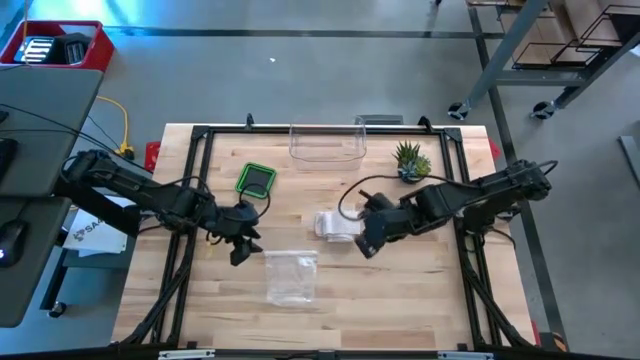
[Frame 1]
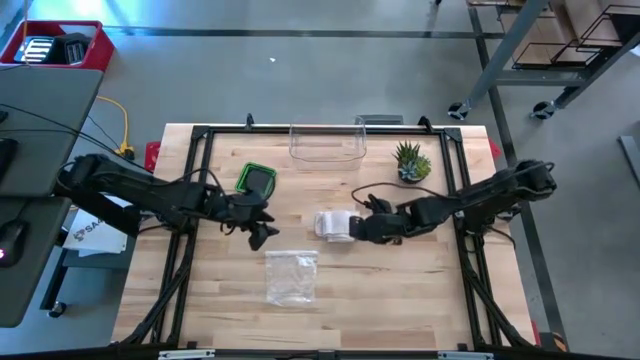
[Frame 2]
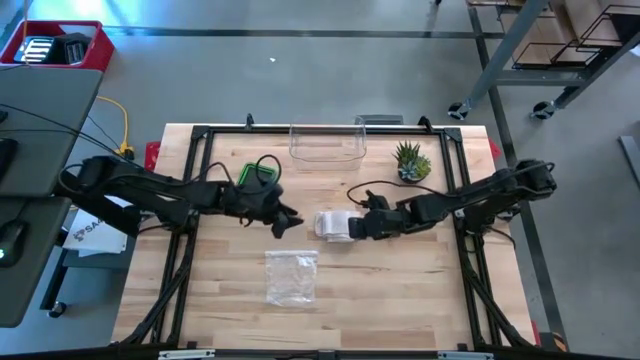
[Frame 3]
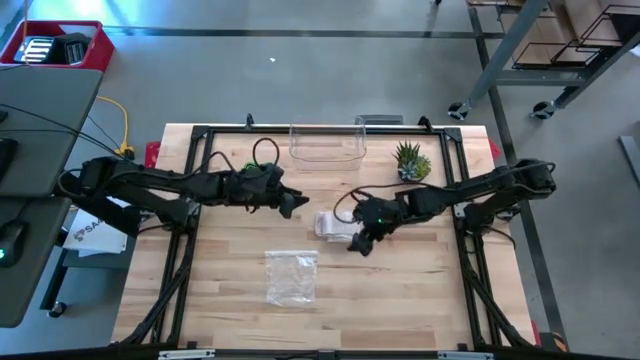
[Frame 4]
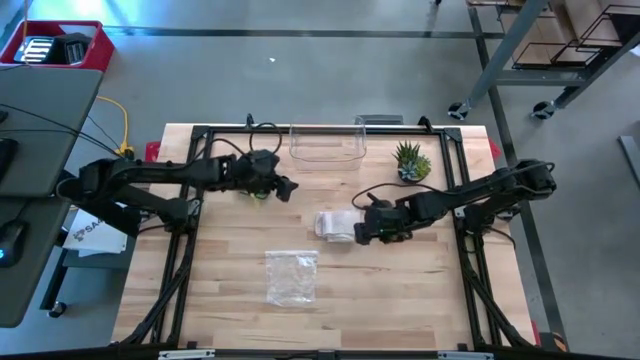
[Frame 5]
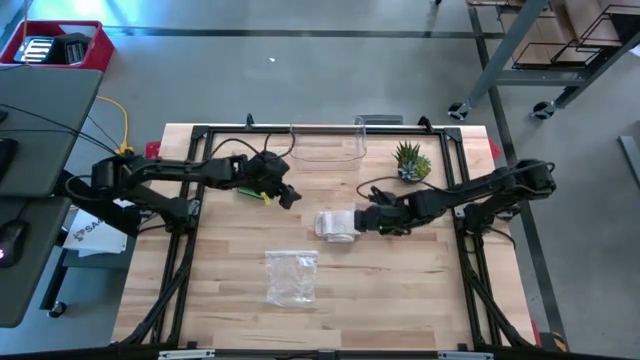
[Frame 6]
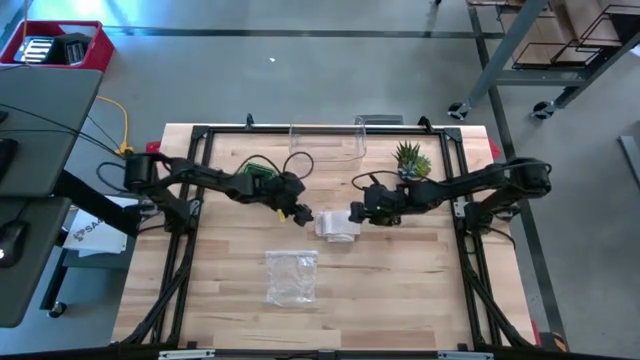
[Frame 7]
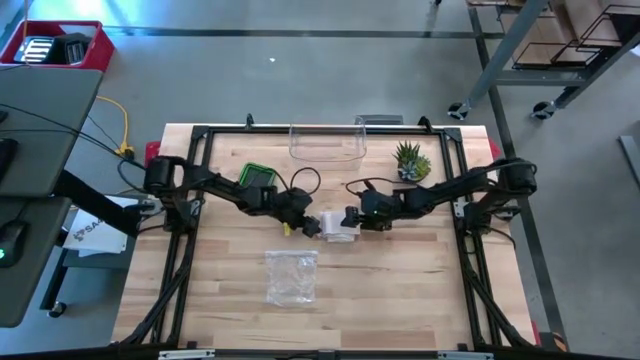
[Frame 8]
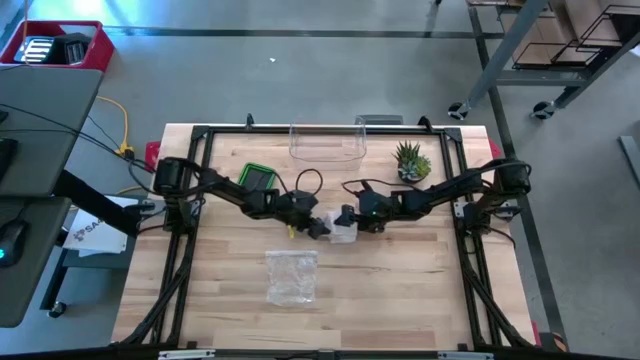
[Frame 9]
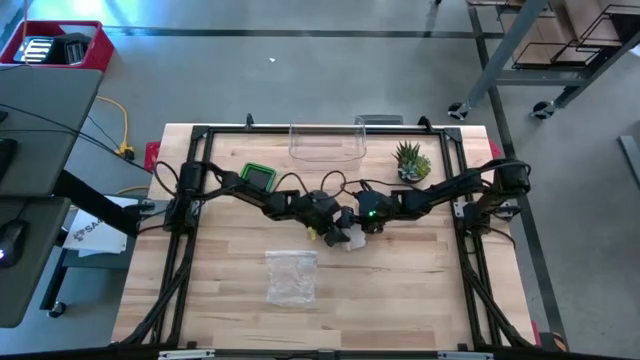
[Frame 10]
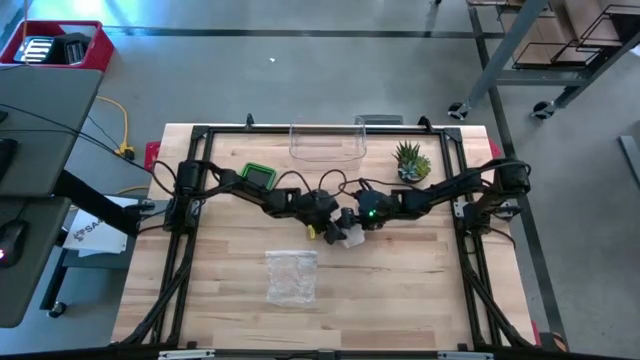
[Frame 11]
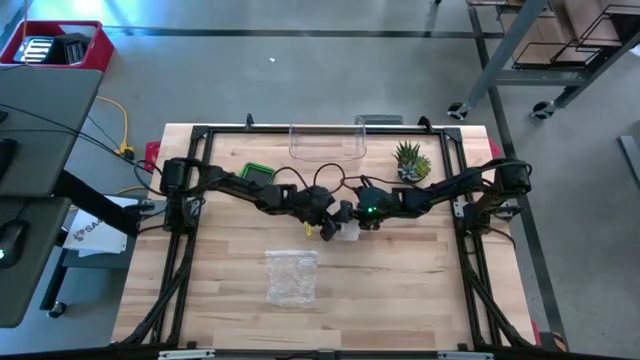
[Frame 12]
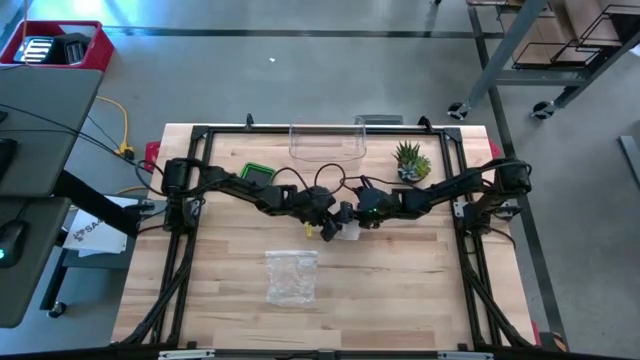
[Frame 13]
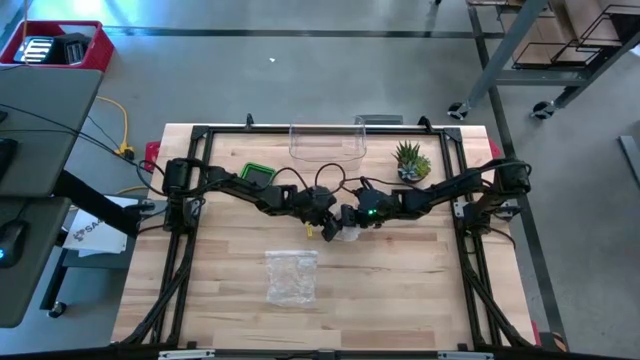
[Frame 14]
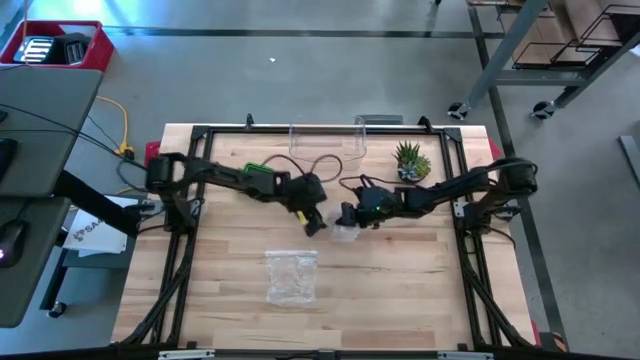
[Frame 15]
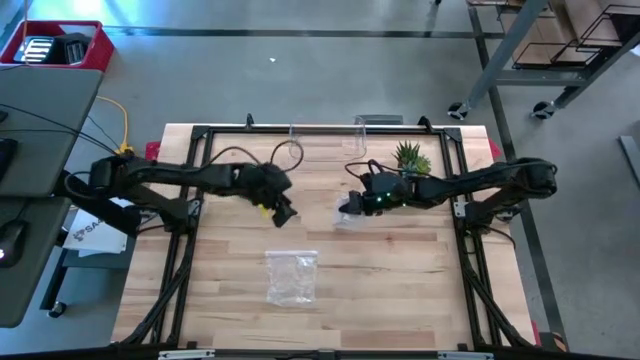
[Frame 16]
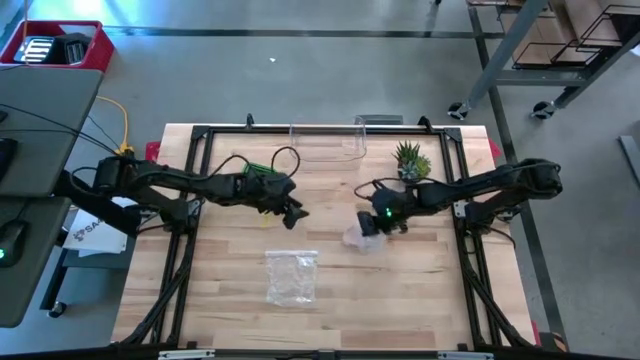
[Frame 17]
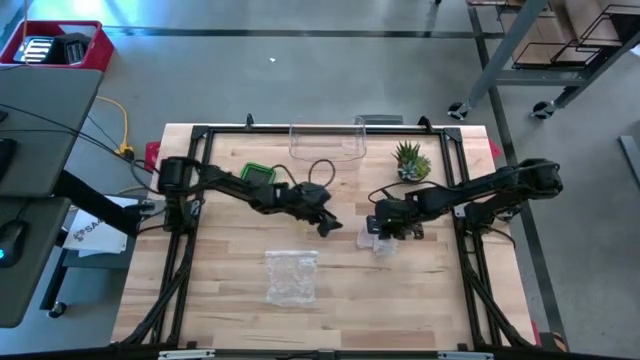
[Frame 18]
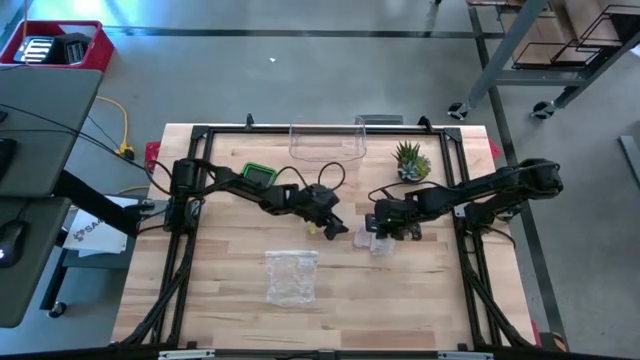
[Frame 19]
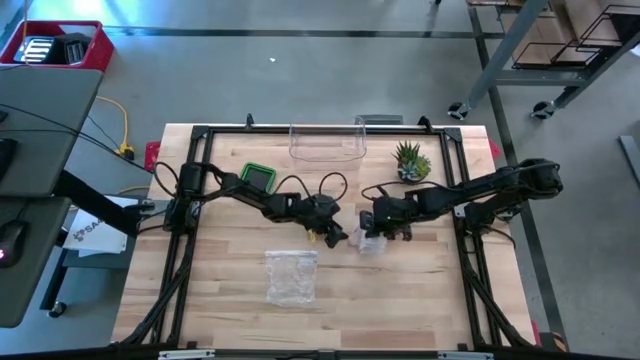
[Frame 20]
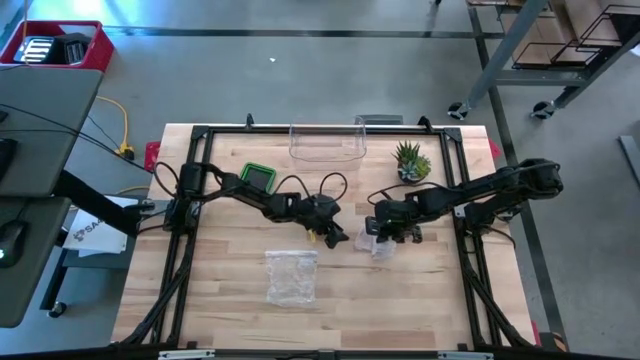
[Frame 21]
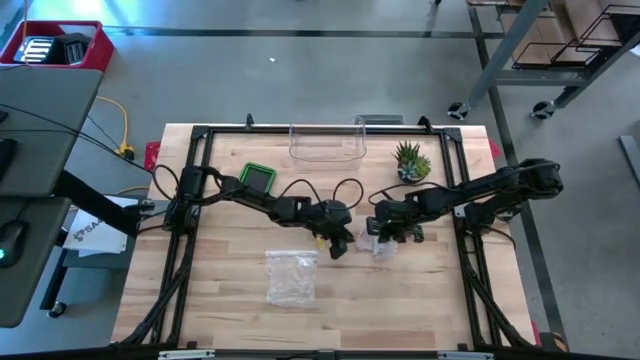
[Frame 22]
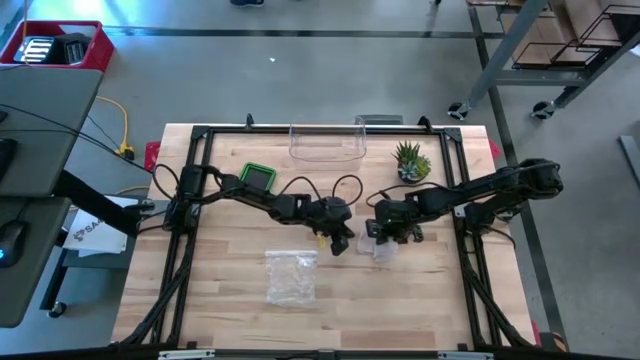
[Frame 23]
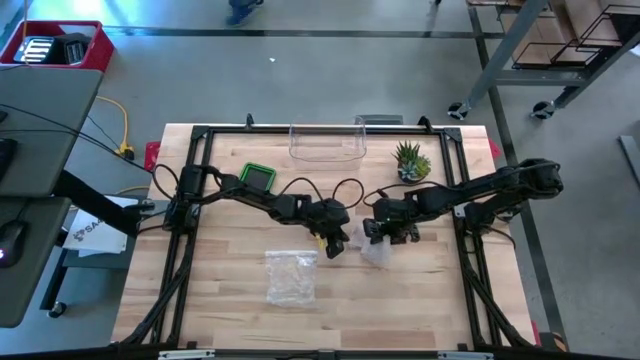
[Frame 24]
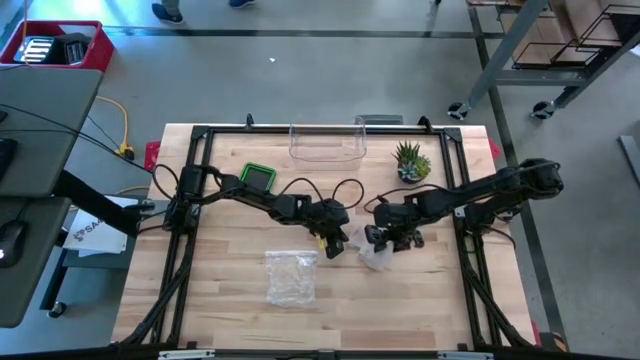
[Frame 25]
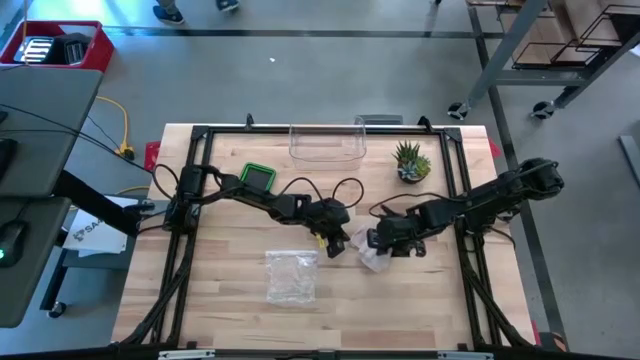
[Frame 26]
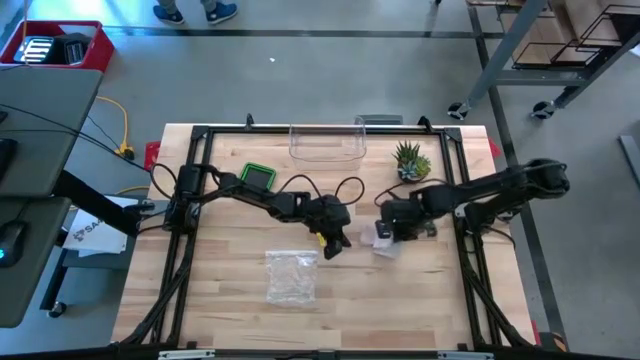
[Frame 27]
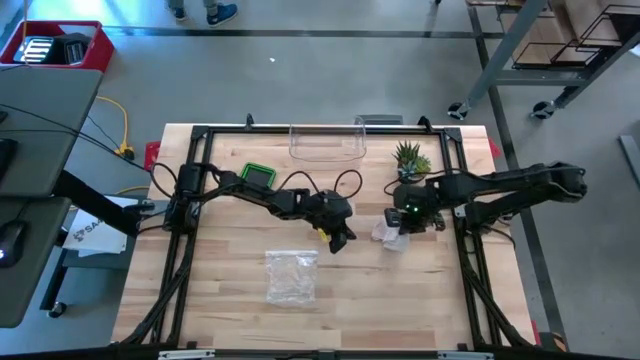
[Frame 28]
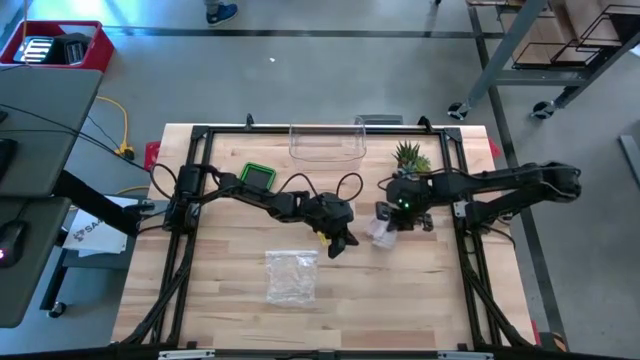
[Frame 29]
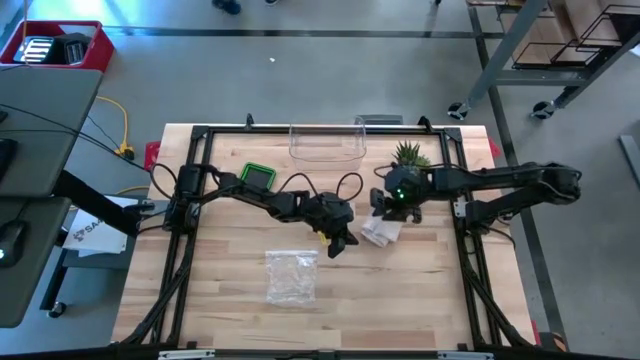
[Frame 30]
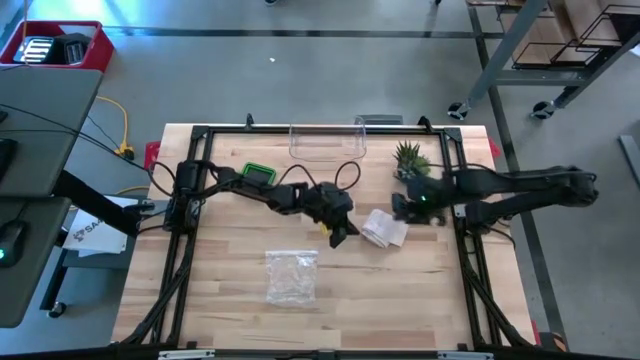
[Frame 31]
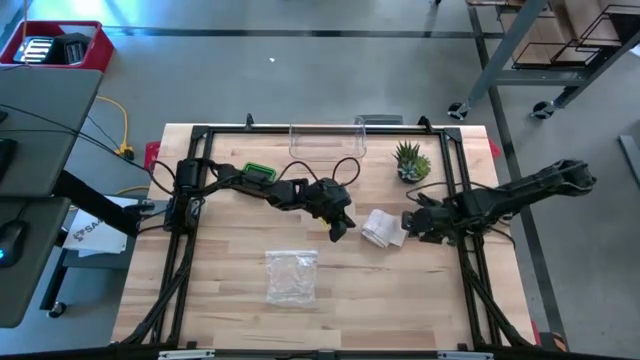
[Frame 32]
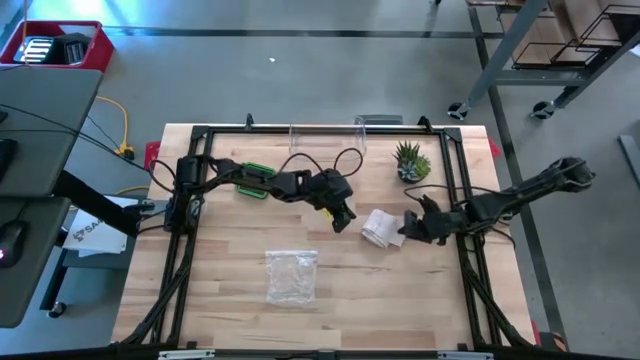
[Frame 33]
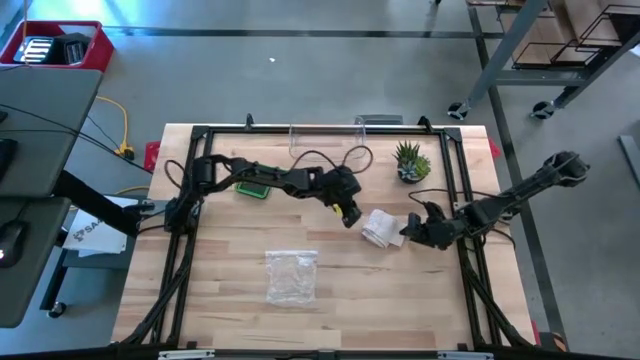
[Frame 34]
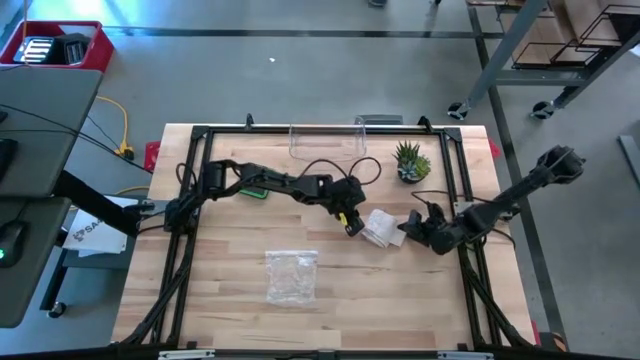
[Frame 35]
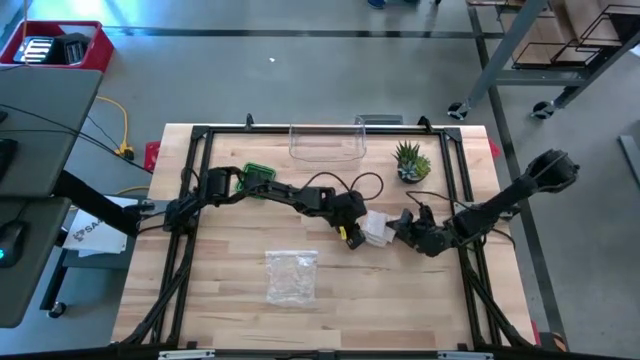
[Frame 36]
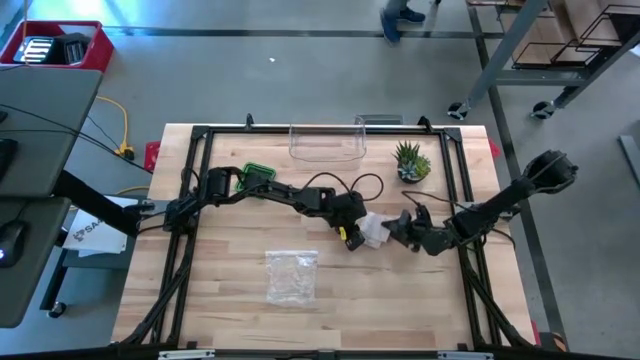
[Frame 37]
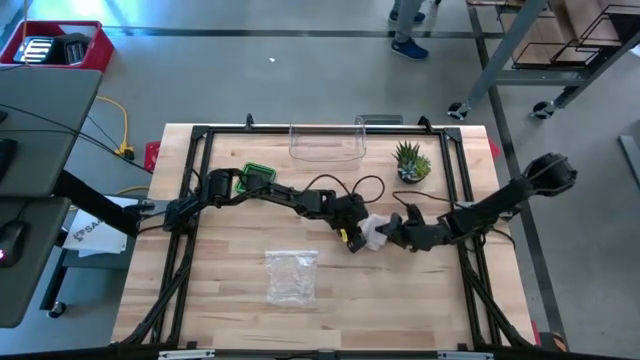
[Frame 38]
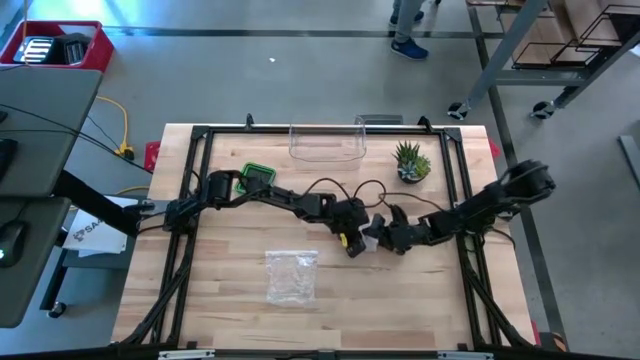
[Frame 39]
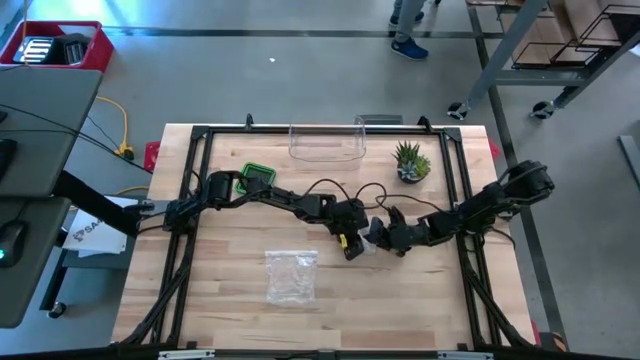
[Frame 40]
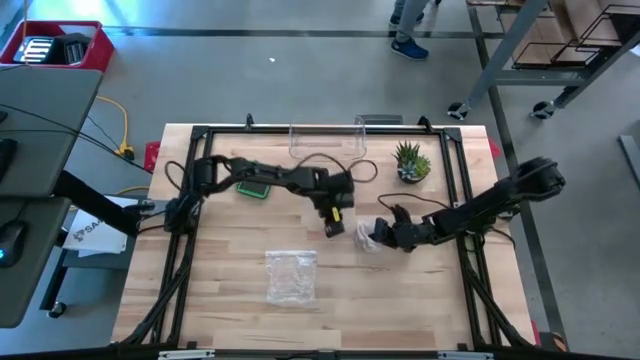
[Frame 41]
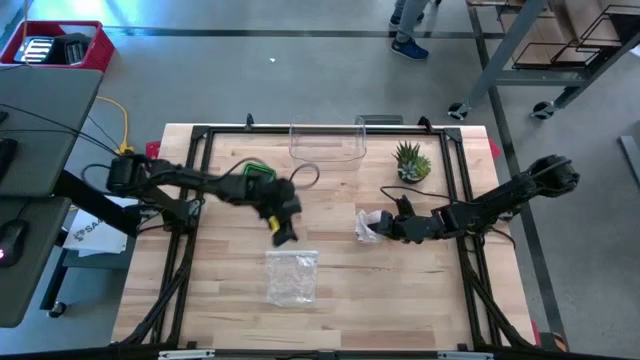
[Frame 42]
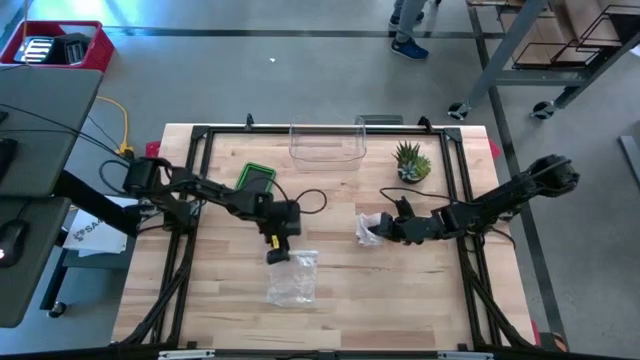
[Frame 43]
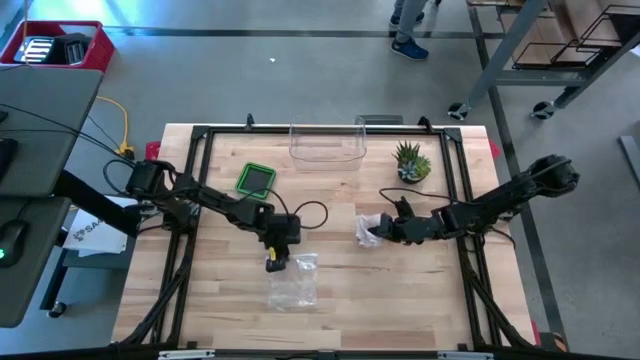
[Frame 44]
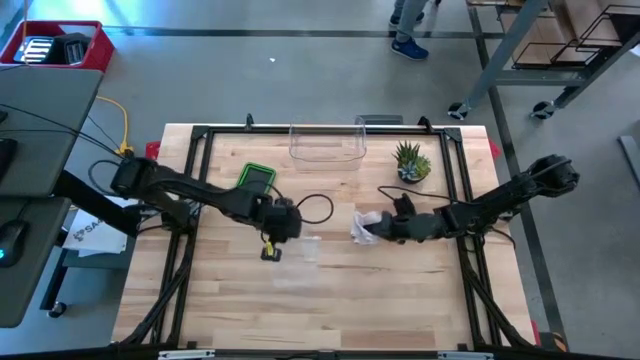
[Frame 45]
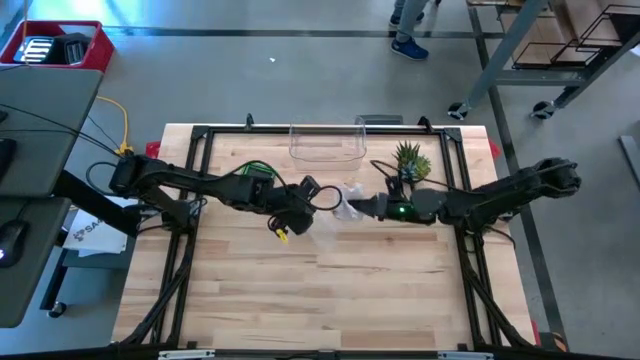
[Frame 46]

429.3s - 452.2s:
Task: Roll bandage
Put the rolled bandage into the transparent zip bag
